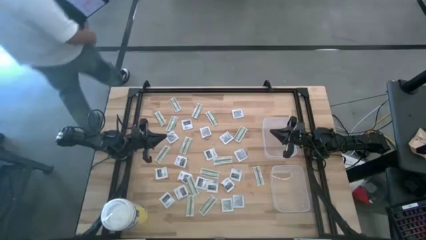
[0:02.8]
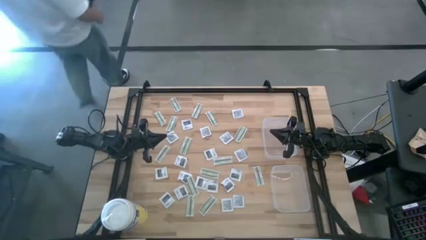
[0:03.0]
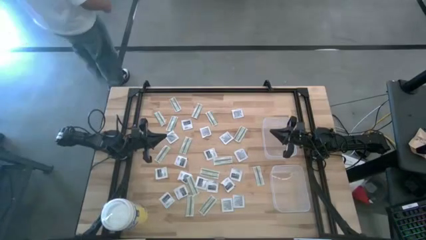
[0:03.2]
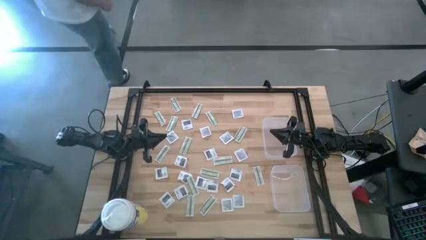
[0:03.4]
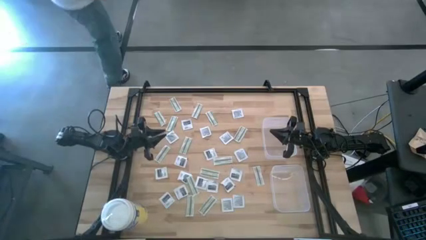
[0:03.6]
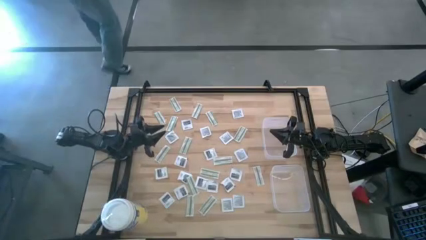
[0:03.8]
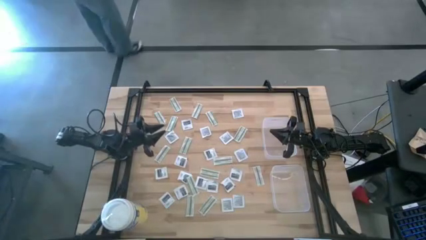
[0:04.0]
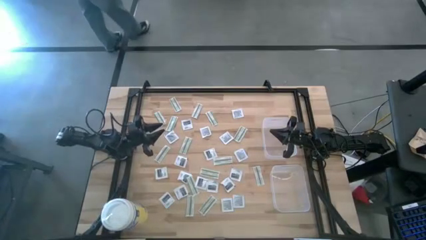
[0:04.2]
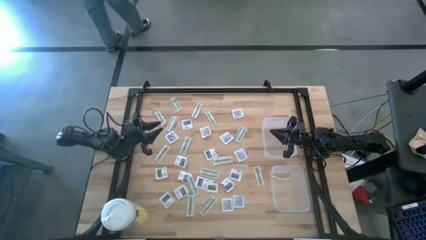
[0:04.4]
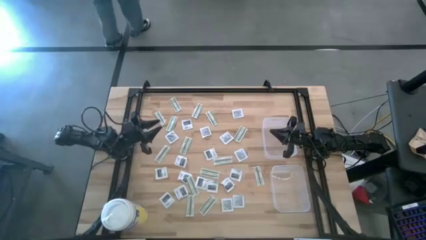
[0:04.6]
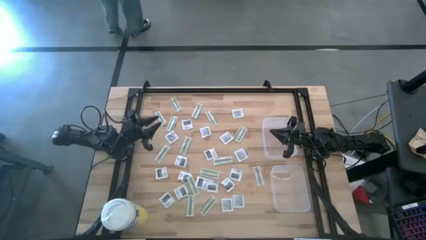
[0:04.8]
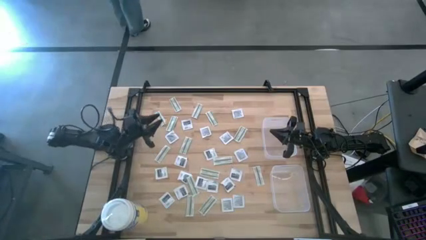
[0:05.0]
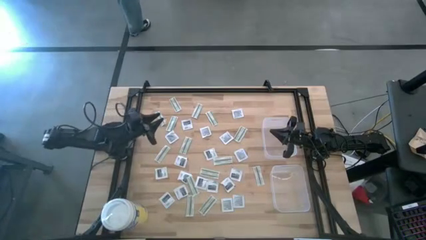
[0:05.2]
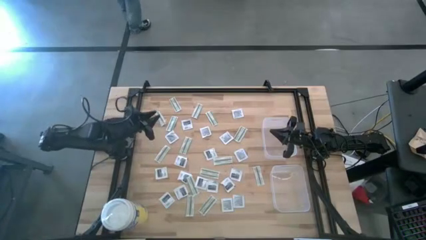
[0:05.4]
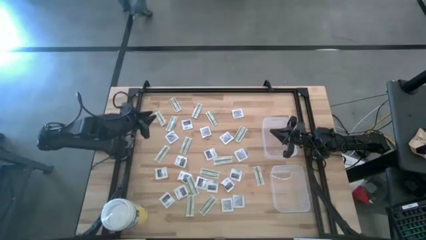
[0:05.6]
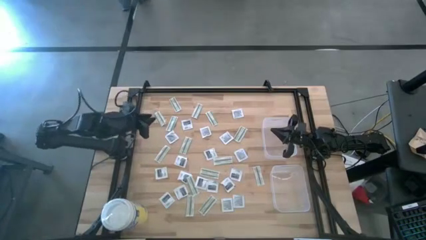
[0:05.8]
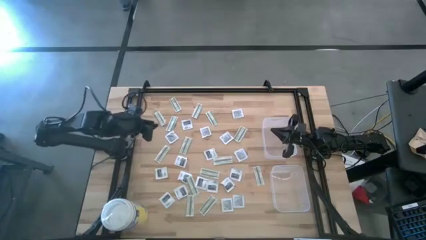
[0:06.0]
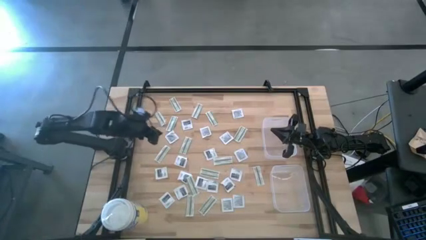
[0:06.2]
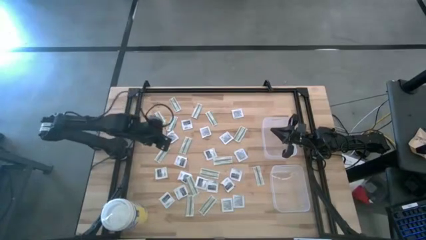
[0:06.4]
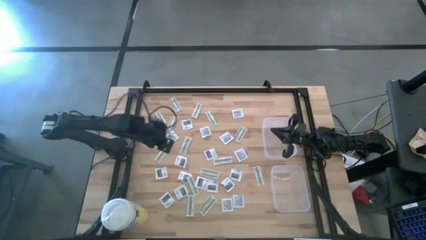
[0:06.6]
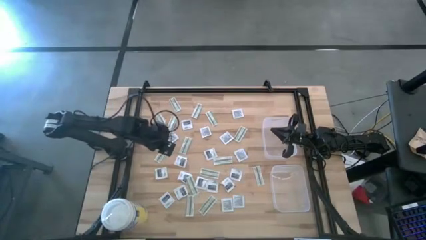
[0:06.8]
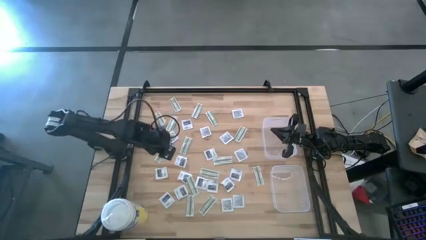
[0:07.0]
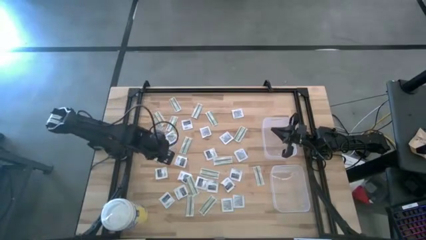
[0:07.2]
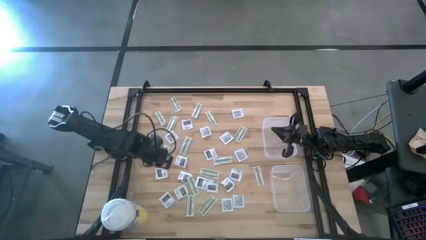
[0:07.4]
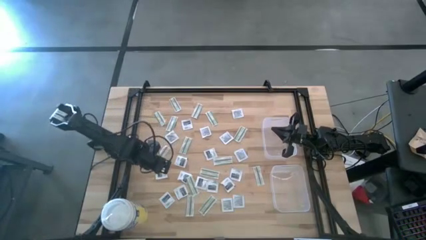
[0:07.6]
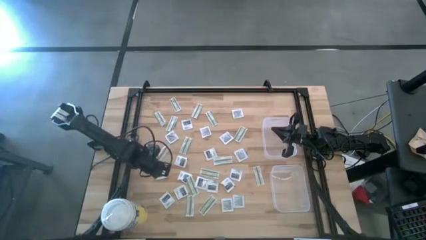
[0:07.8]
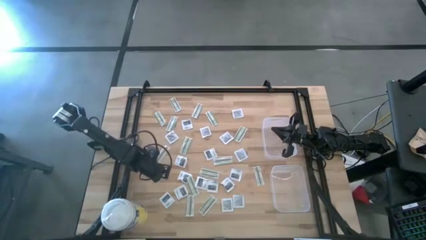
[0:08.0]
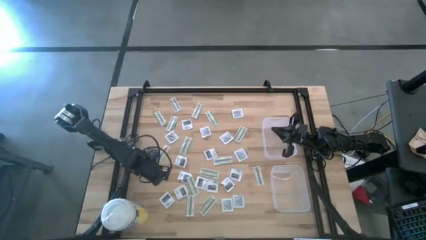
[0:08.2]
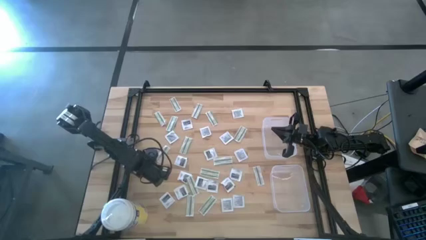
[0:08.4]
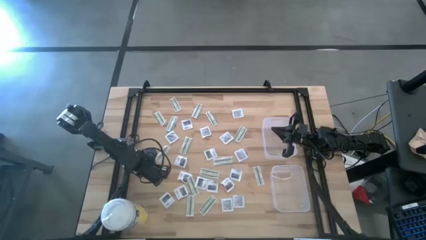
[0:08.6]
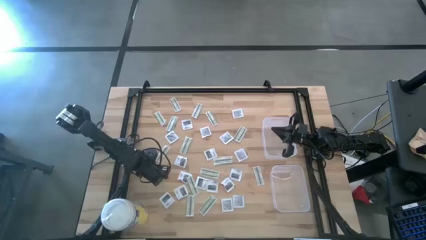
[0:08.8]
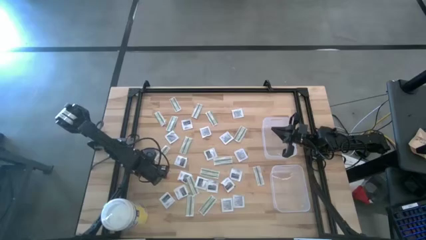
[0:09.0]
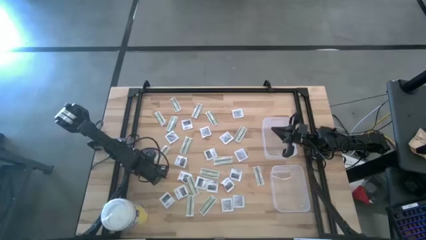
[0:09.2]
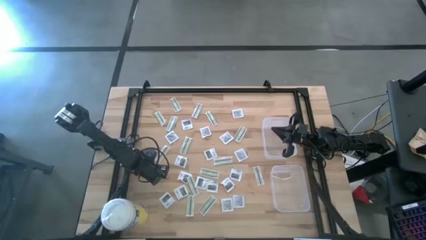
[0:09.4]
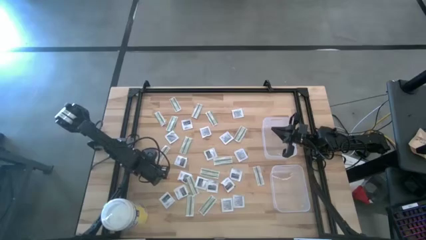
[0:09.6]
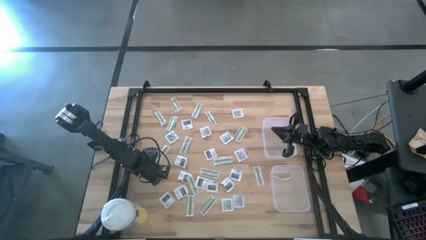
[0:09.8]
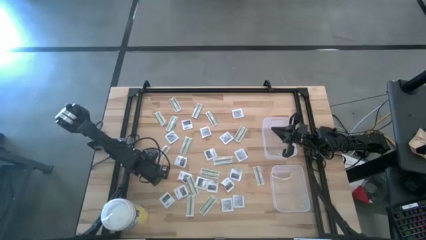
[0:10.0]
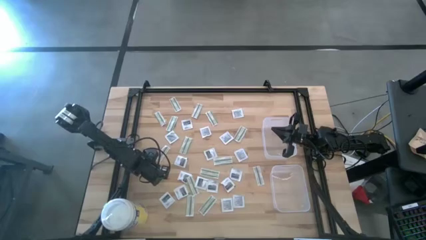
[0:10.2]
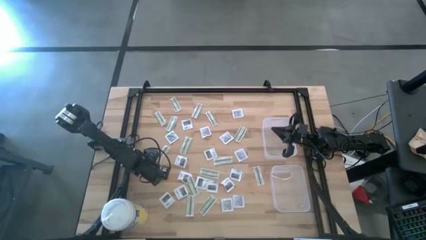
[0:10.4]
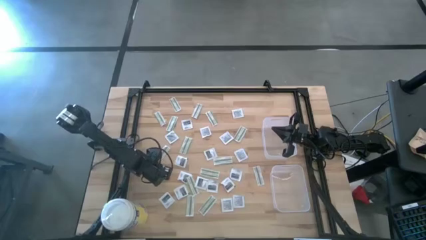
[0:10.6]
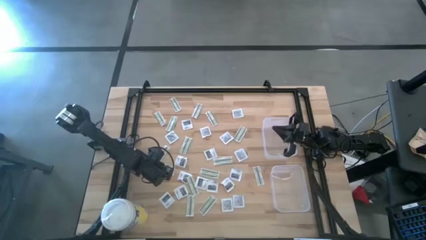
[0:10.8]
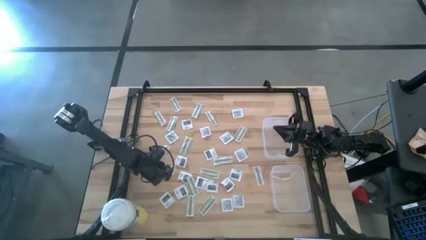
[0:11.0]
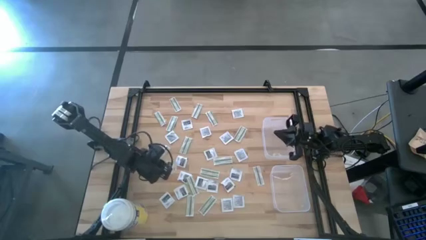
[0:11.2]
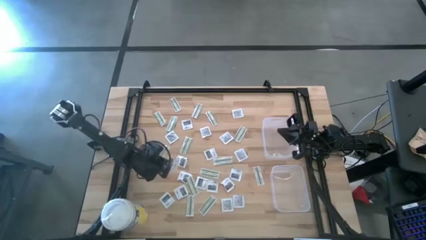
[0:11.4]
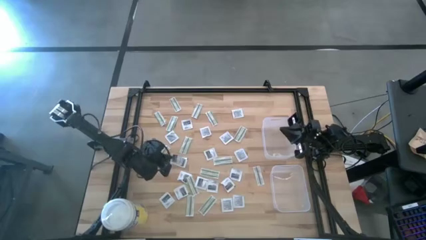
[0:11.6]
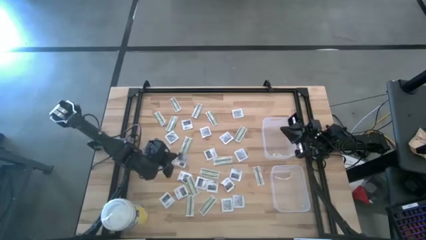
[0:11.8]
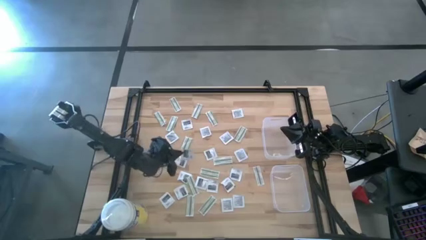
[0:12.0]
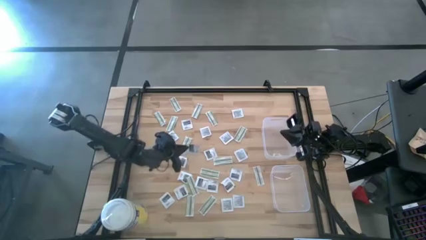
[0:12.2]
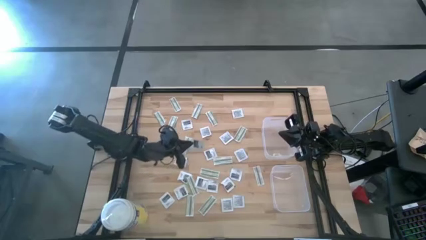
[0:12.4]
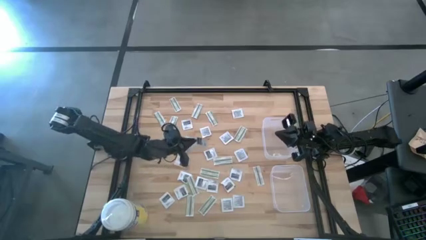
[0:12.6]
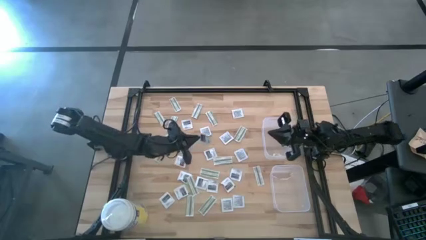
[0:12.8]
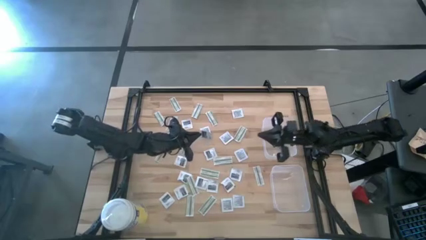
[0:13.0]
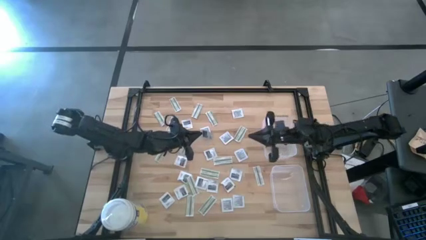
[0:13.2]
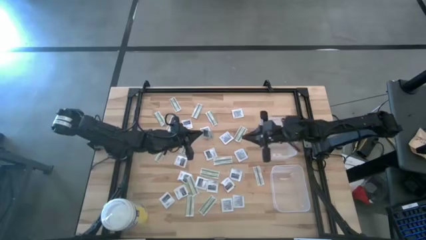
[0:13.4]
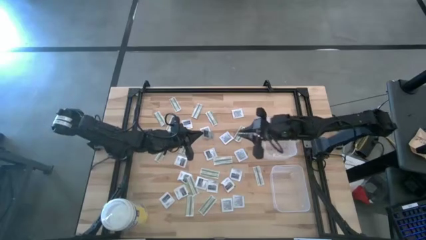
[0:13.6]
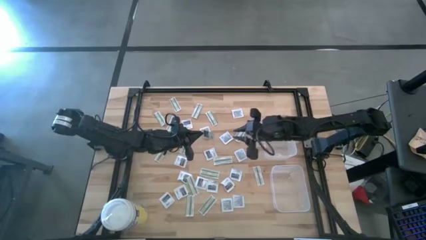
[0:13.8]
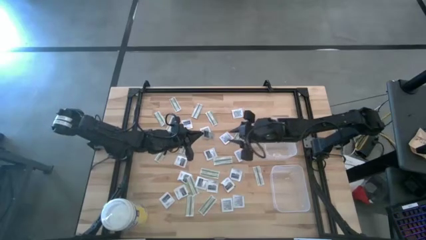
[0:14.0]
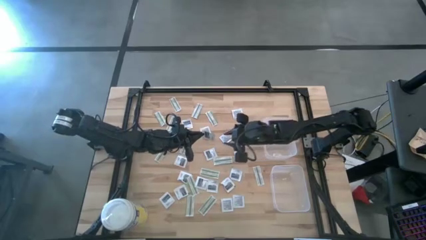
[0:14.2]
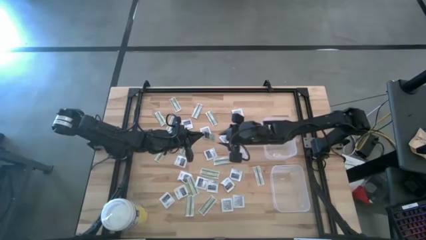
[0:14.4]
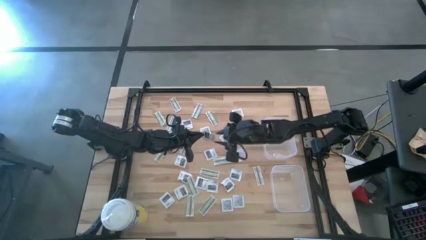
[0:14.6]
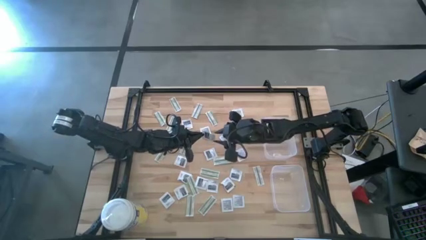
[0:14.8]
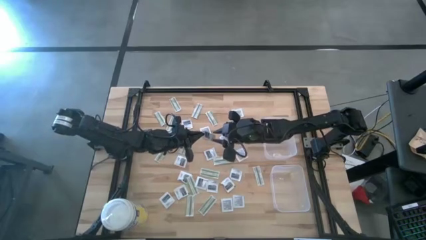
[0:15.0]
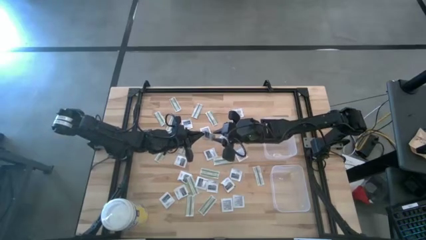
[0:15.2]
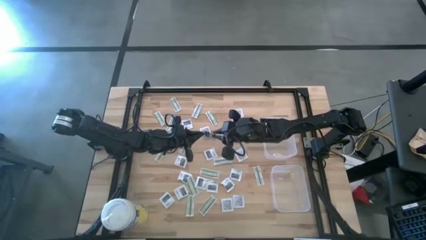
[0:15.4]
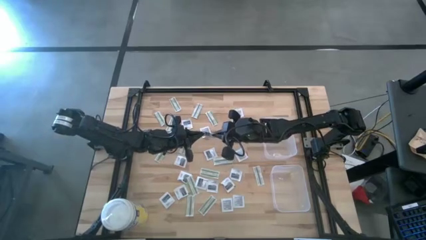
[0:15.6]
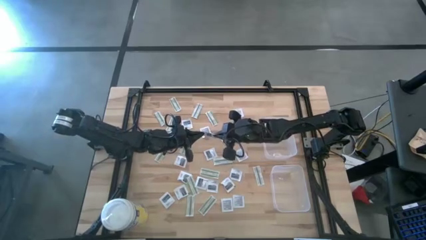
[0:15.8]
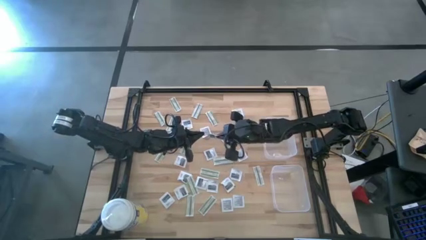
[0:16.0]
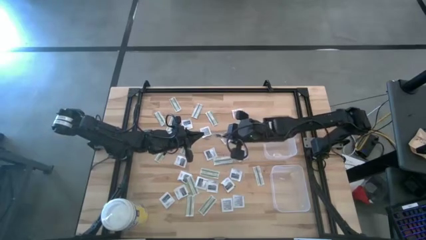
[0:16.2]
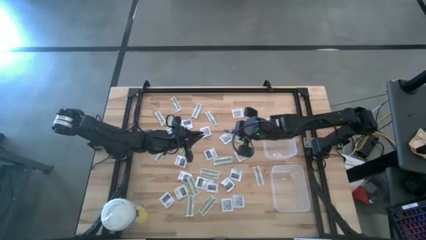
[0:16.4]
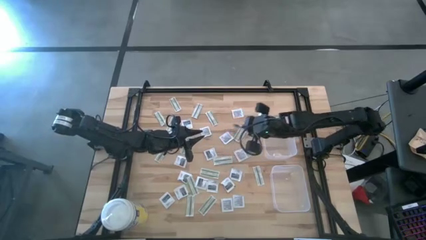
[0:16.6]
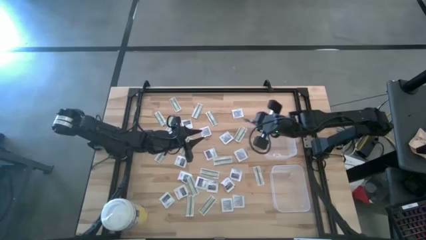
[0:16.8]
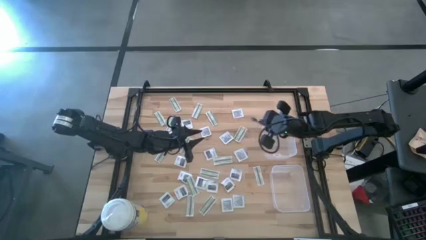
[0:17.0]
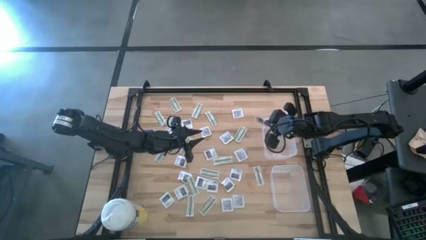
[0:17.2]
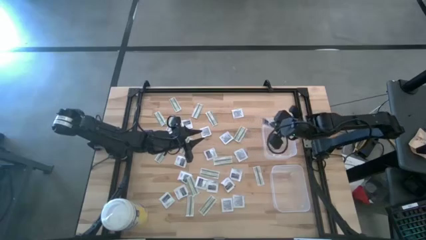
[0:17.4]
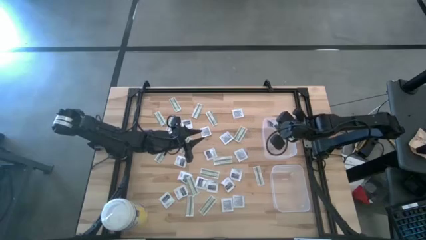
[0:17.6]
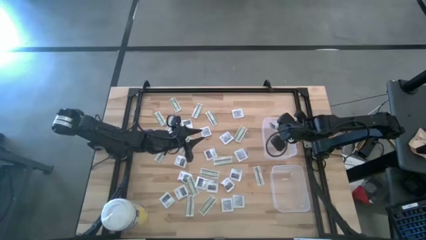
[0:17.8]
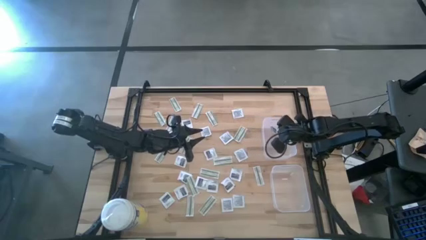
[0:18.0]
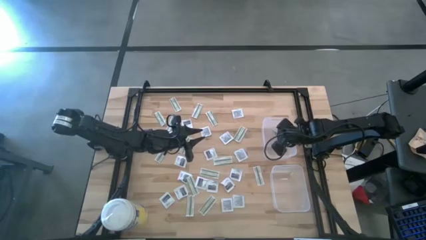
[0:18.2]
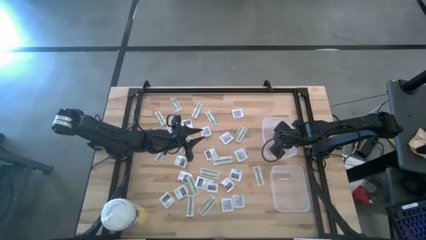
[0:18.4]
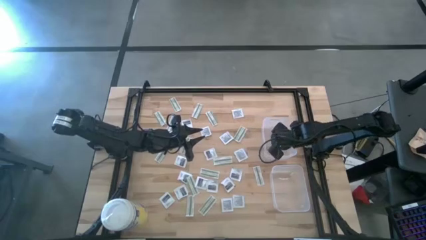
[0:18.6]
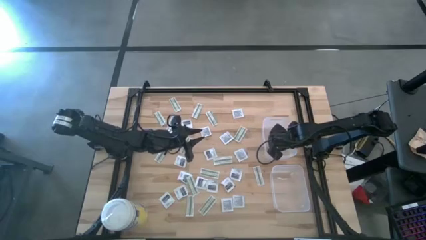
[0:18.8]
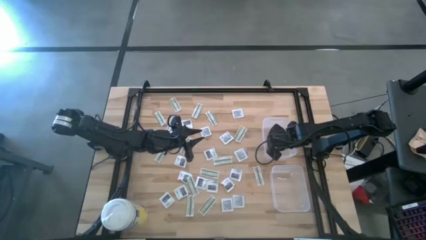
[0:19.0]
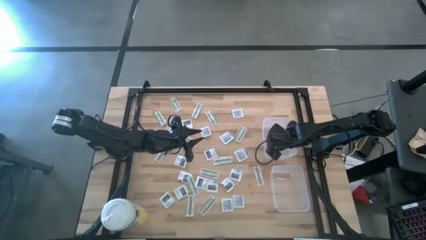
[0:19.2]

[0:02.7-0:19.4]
Task: Pick & Place First Aid Supplies
Put the towelette pack into the top bin
